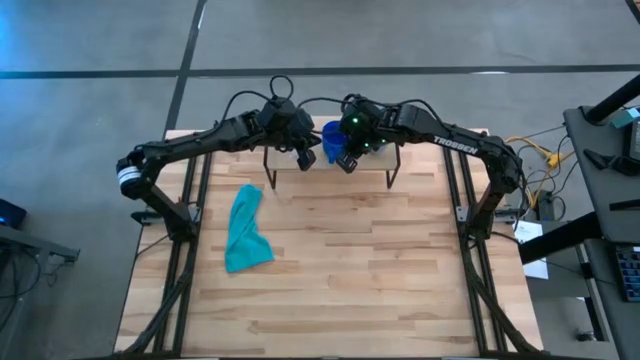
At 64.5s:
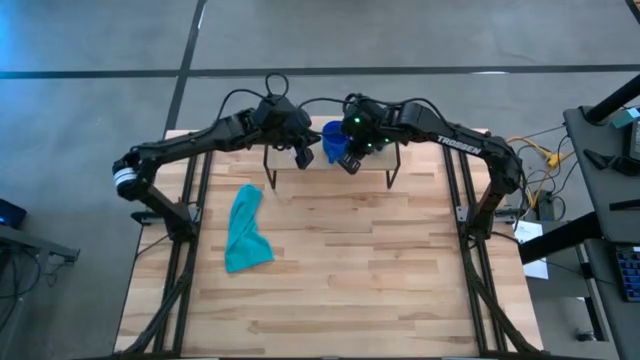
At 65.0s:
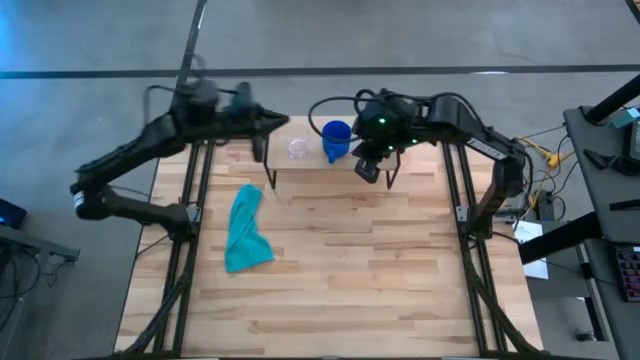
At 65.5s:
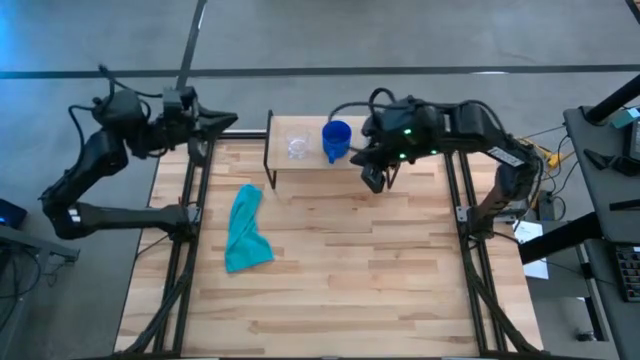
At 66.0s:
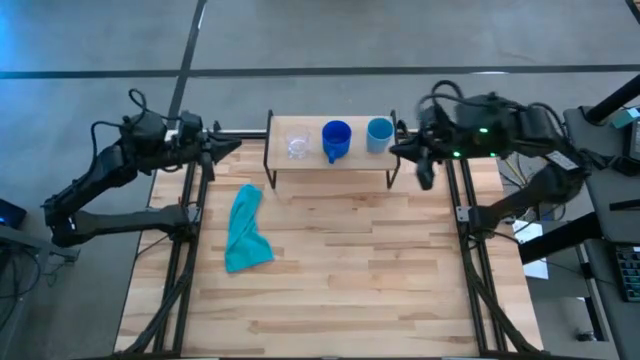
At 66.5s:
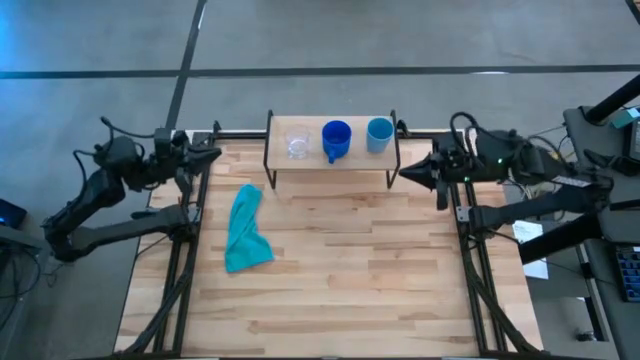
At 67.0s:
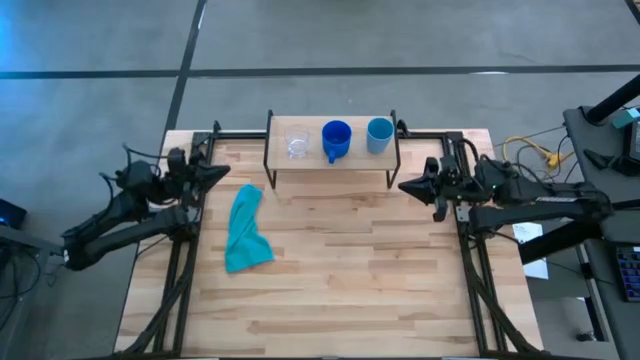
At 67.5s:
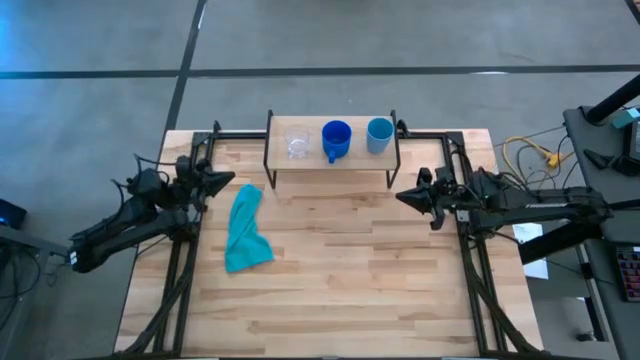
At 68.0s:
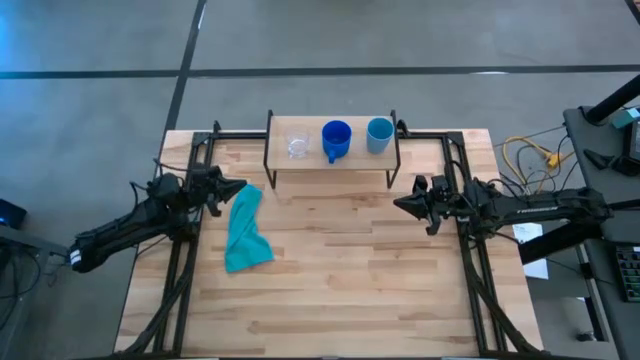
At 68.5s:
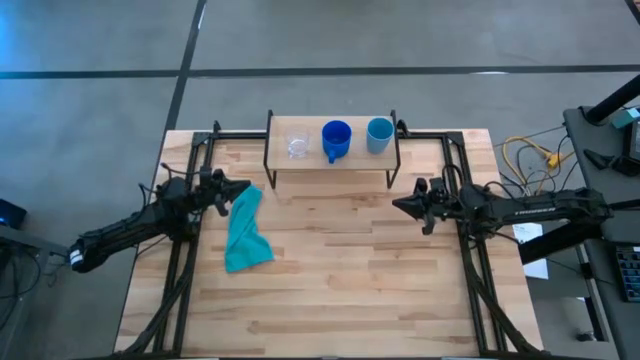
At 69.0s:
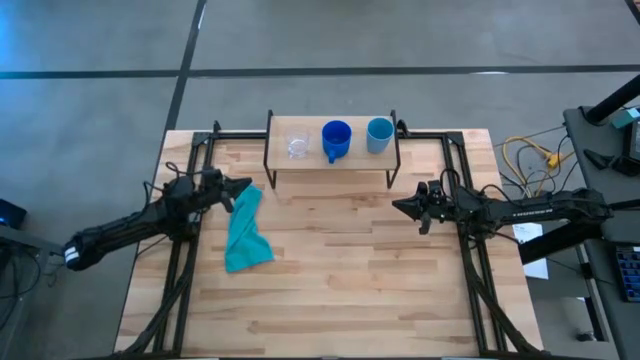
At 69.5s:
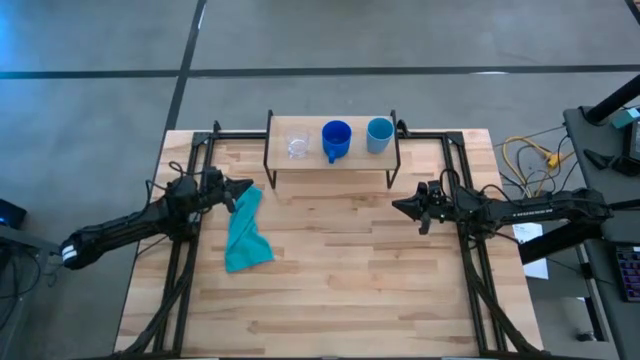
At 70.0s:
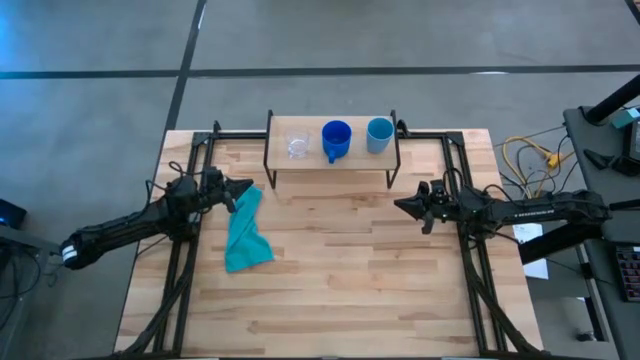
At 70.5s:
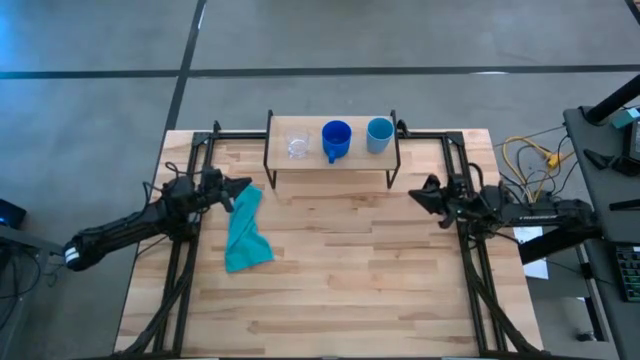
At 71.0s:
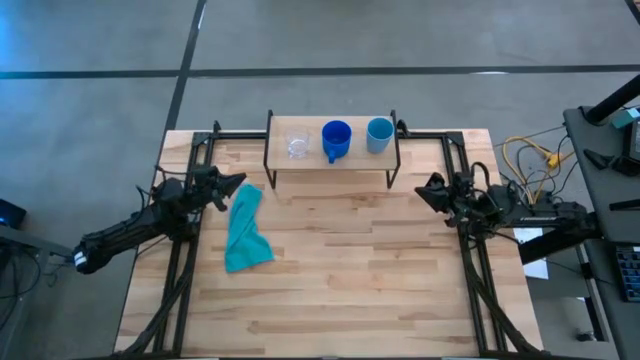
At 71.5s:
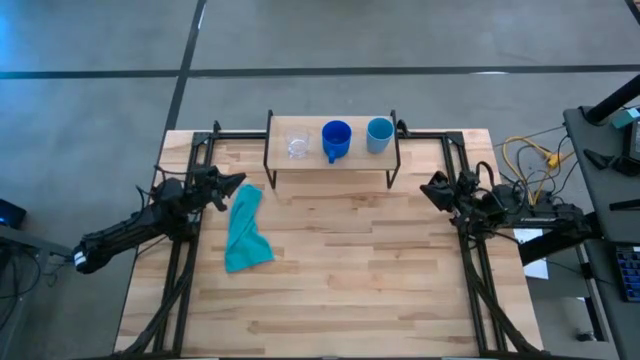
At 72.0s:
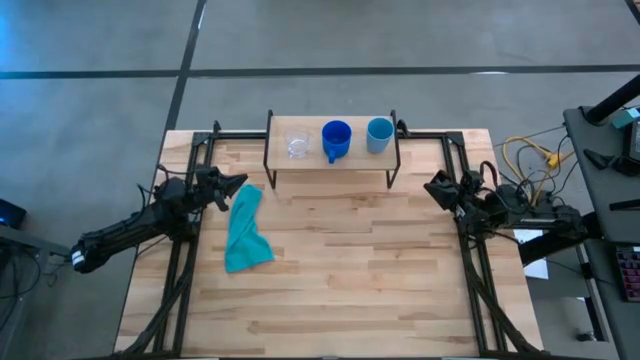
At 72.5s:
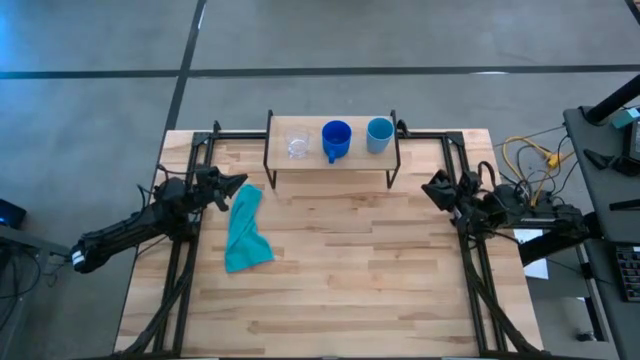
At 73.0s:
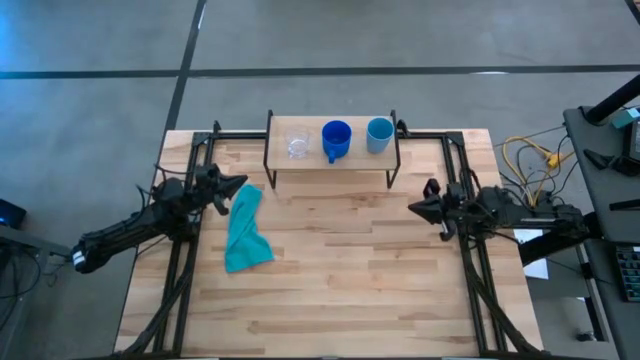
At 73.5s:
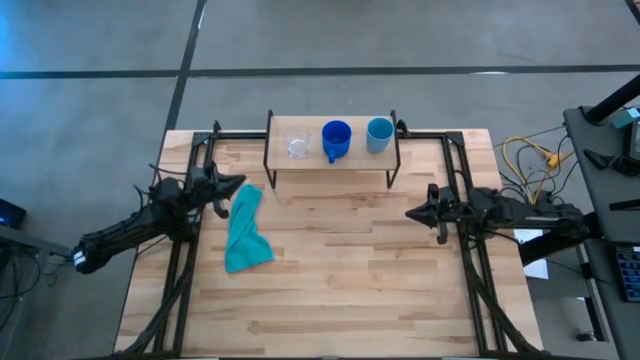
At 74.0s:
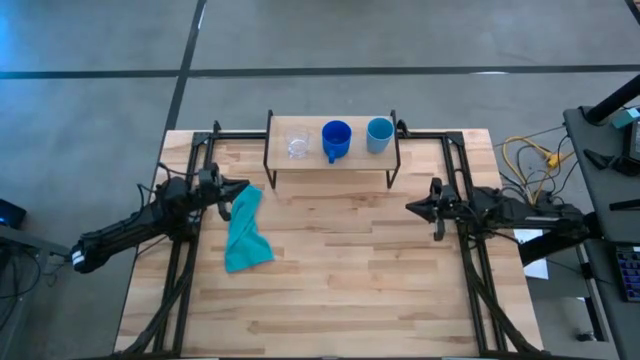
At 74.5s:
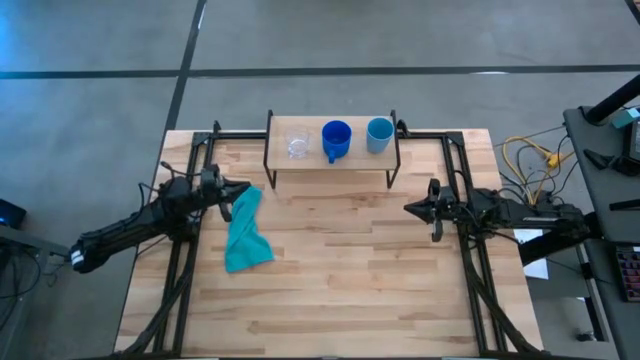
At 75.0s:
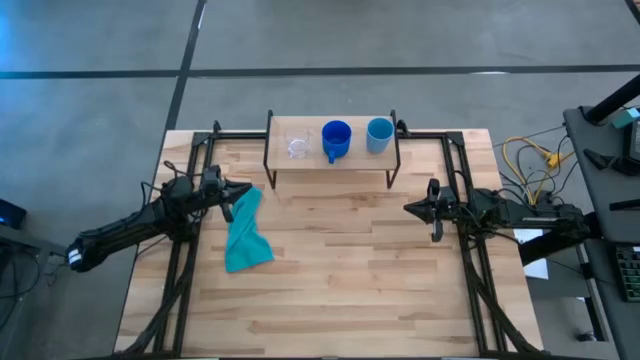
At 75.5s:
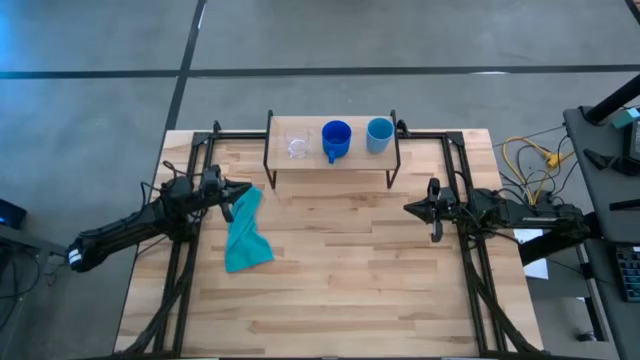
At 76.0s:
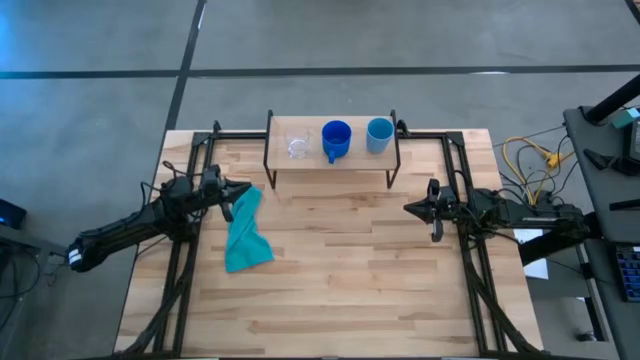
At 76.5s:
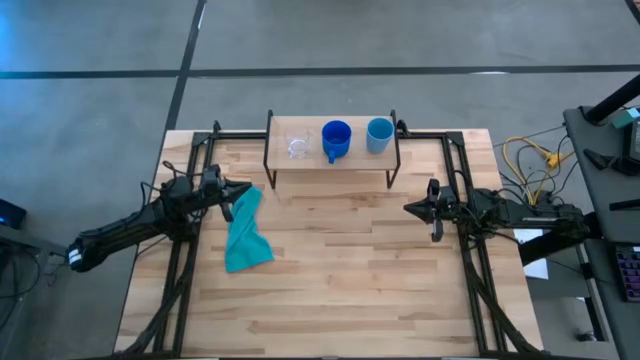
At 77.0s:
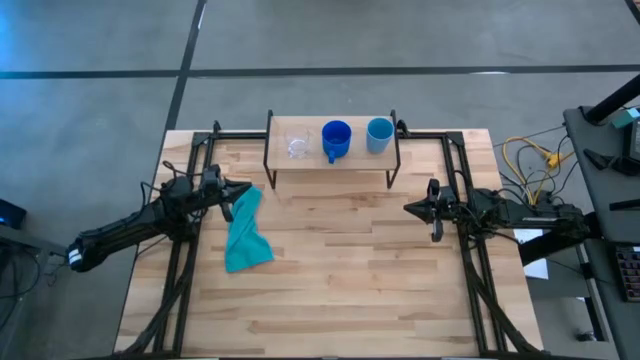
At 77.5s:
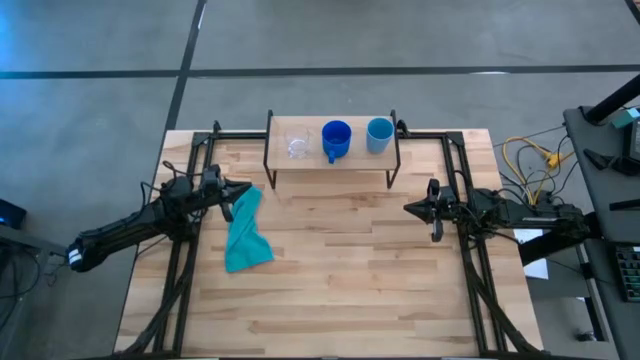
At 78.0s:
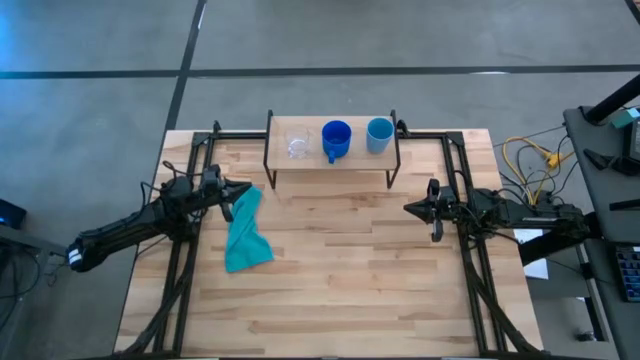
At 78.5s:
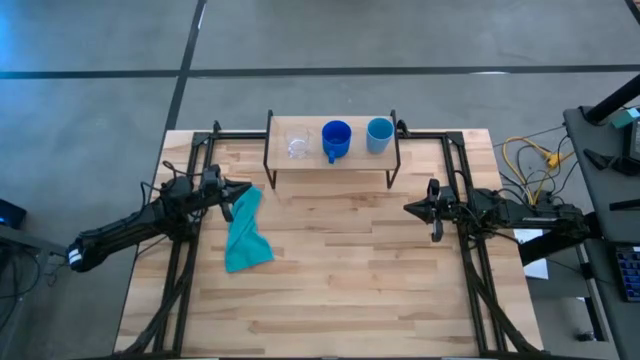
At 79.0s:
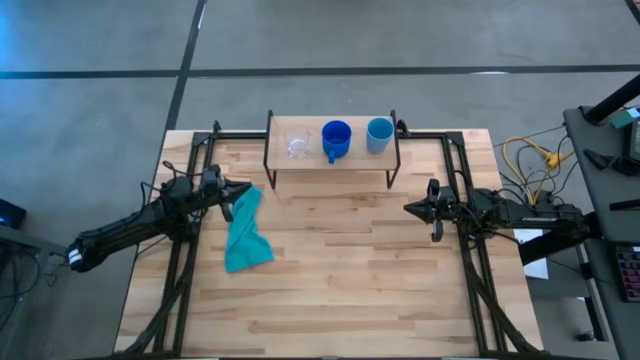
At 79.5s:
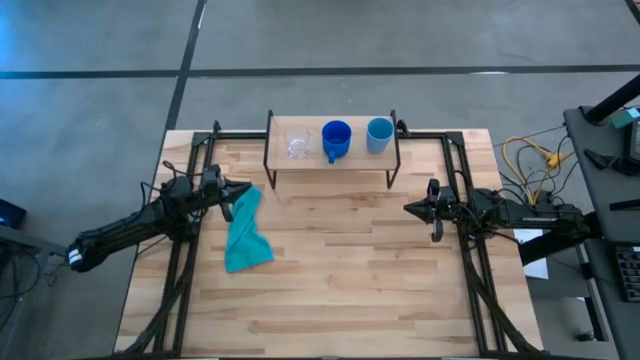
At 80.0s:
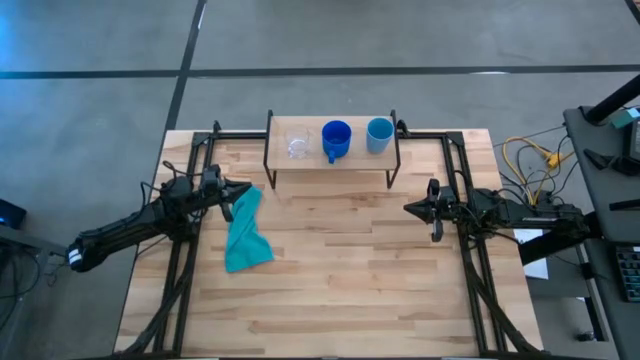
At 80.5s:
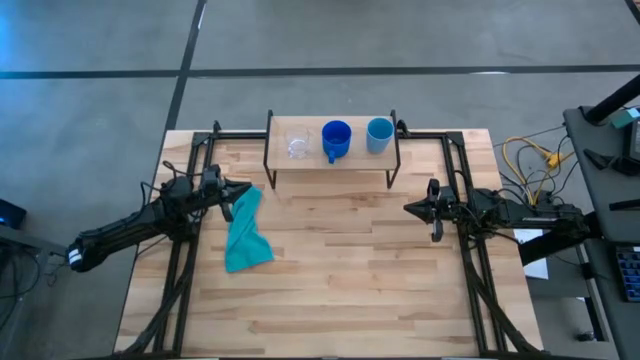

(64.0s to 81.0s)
Task: Stack small to large cups/mugs on shelf
Return to Home Position

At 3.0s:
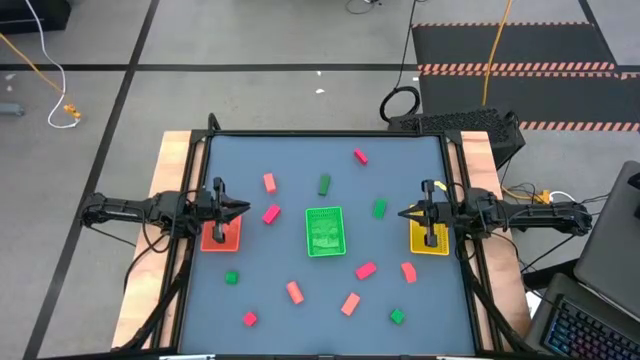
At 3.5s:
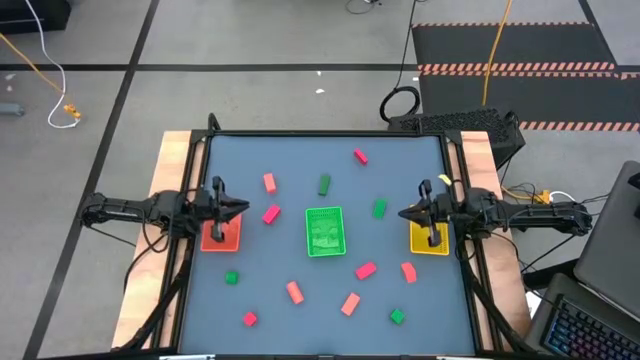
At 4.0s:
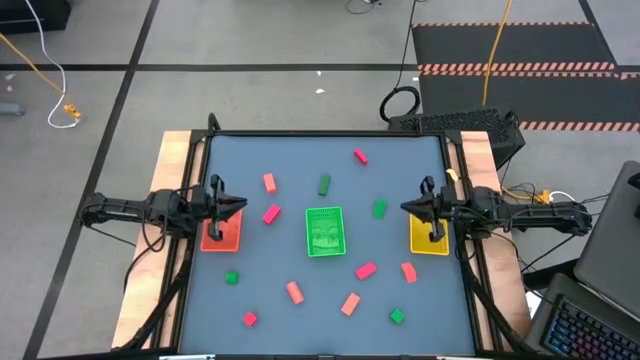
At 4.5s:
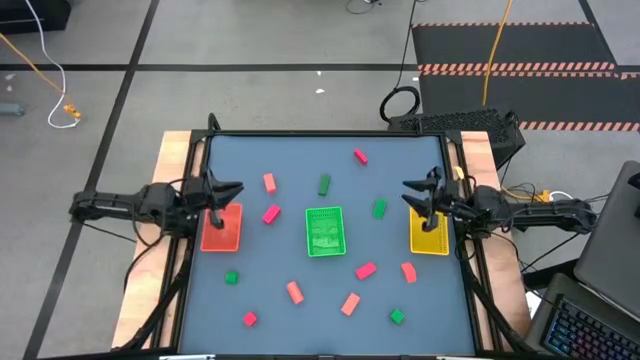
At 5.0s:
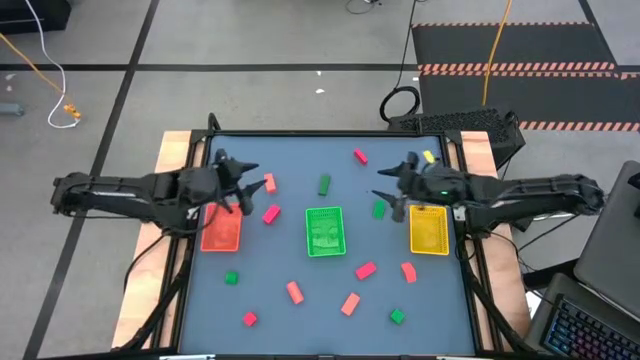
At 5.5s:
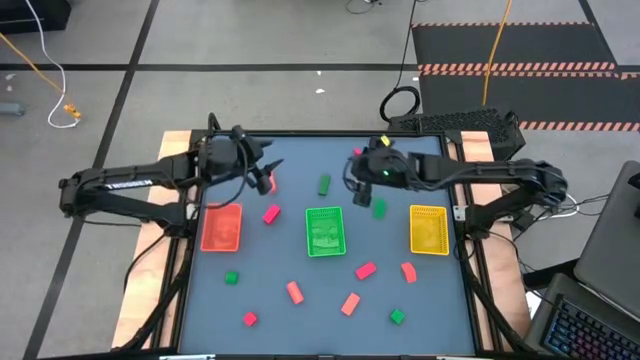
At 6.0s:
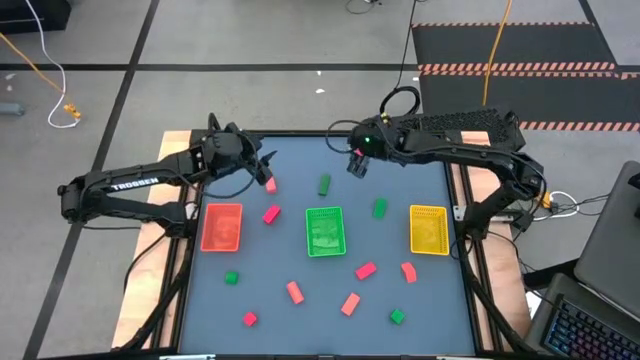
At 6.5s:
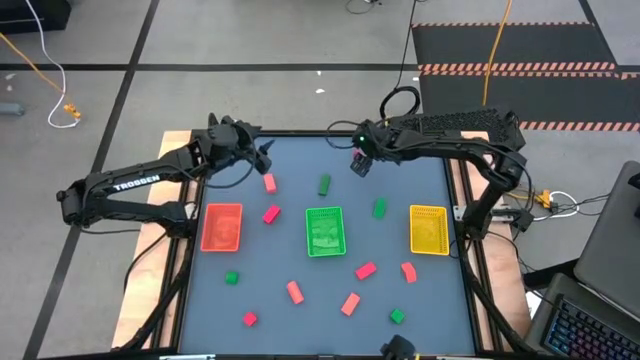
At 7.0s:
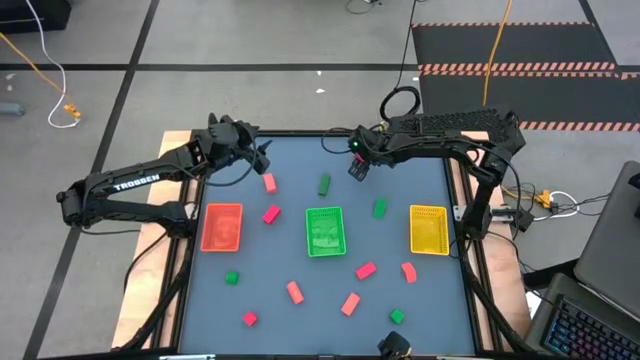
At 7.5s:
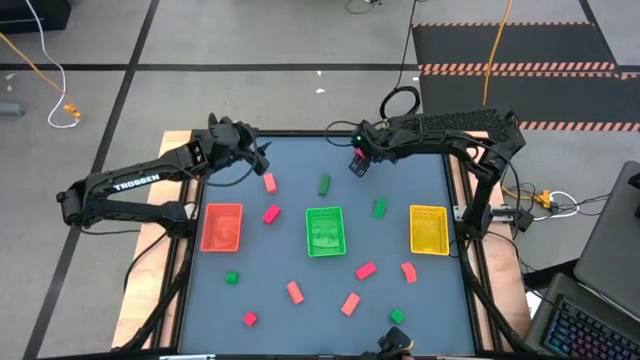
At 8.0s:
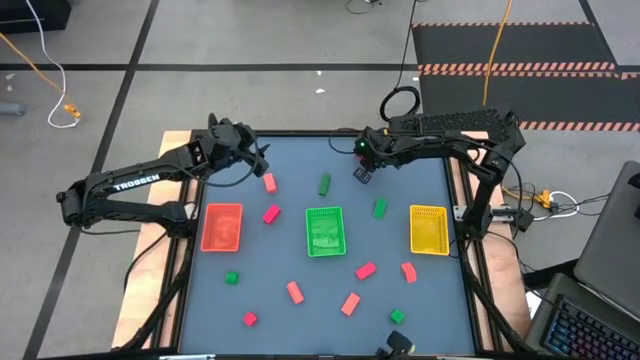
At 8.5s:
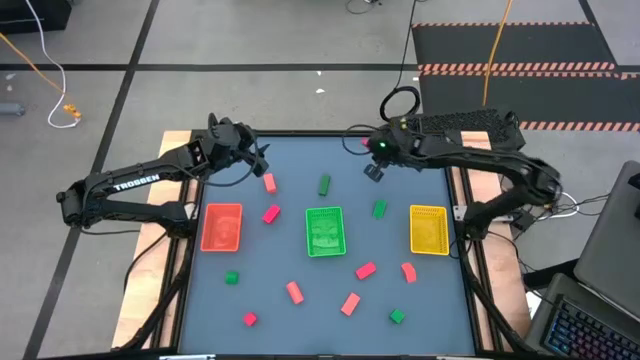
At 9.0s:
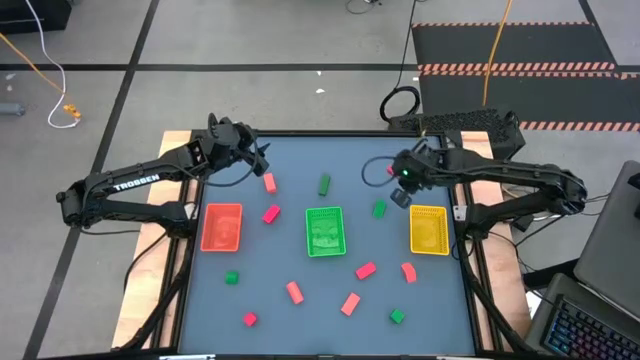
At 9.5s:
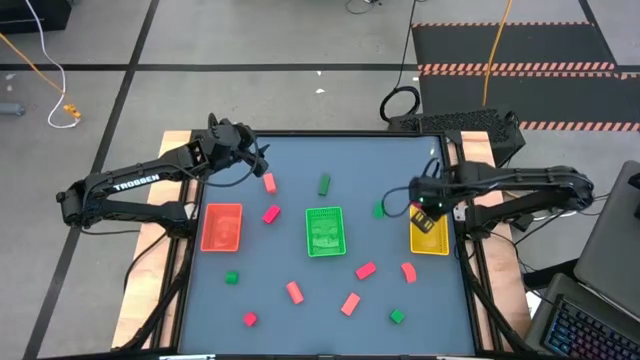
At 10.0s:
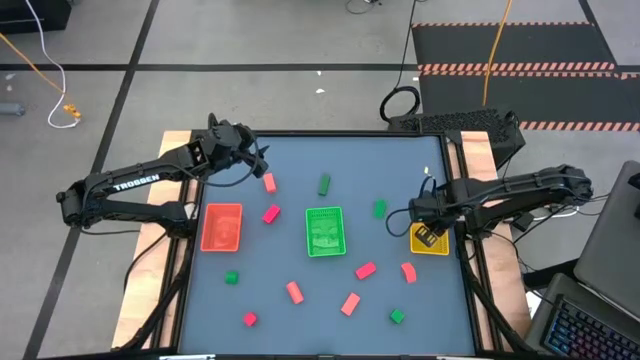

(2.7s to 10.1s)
Task: Sort & place blocks by color
Put the red block into the yellow bin
